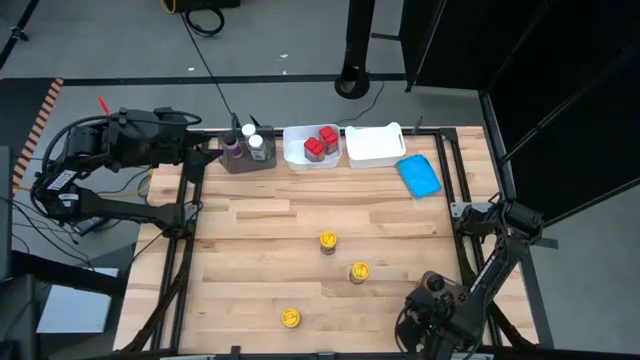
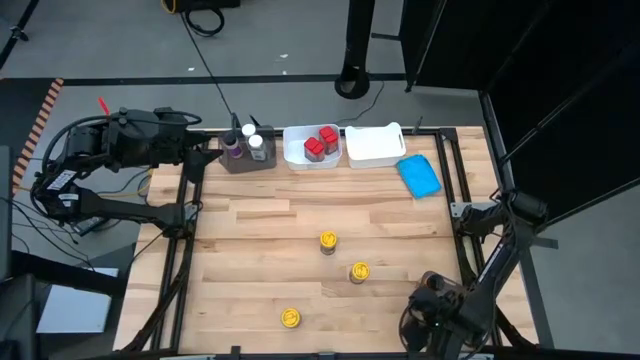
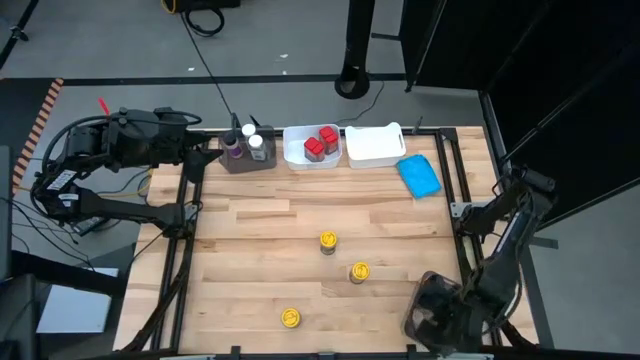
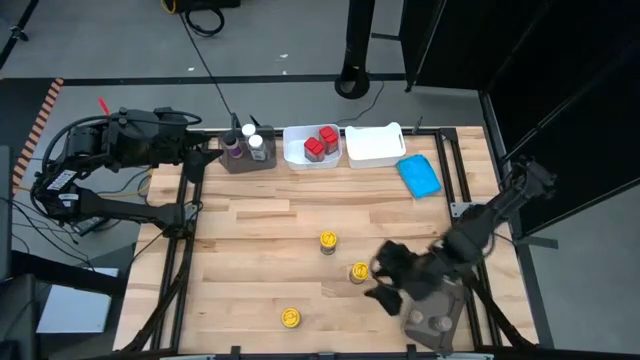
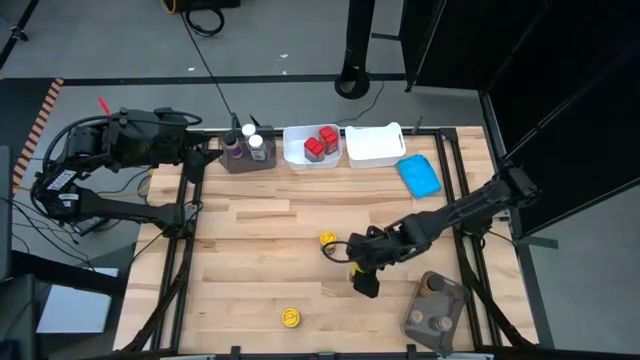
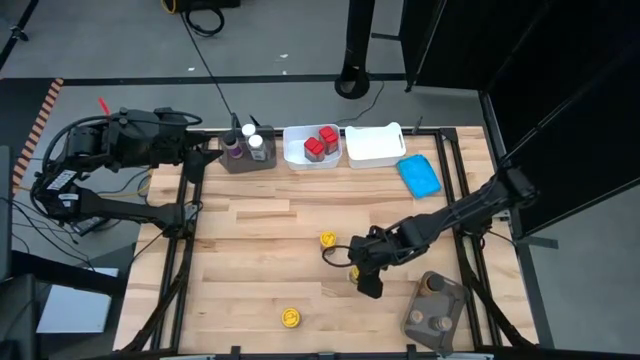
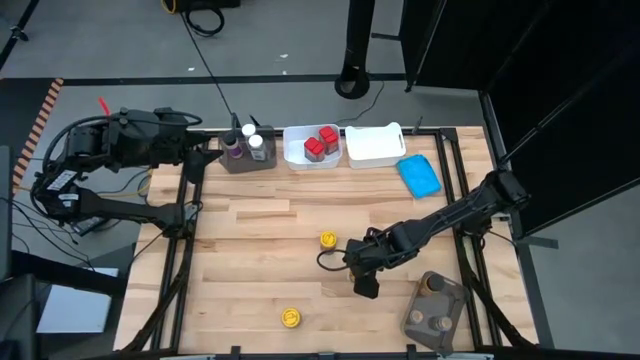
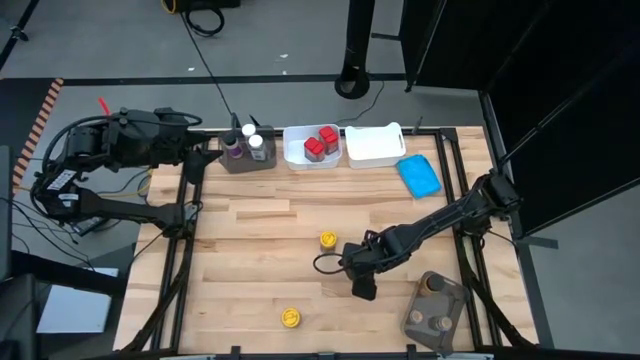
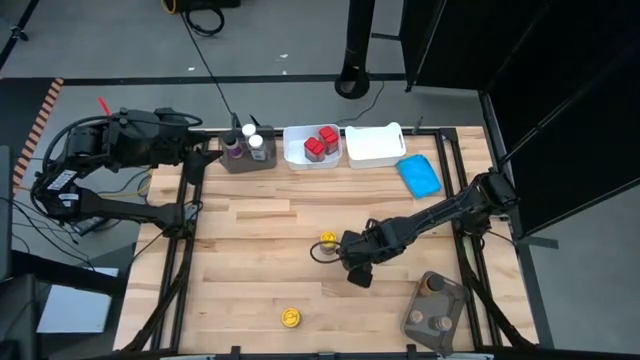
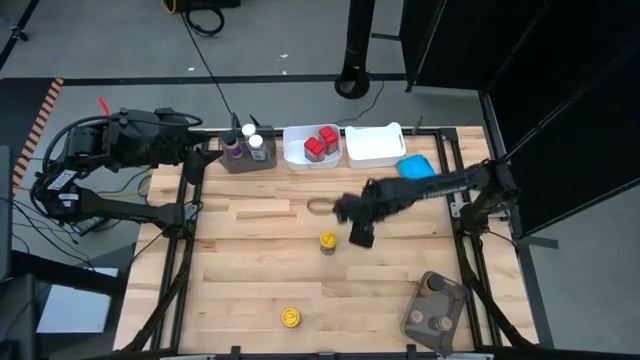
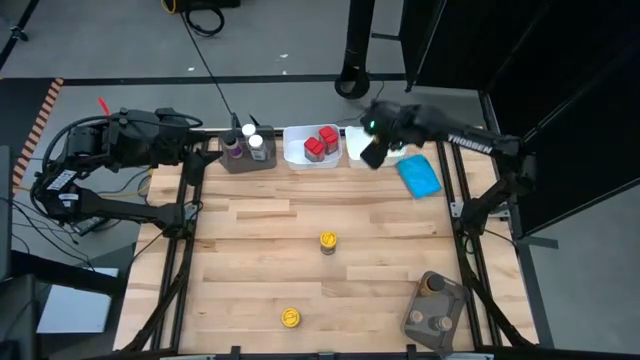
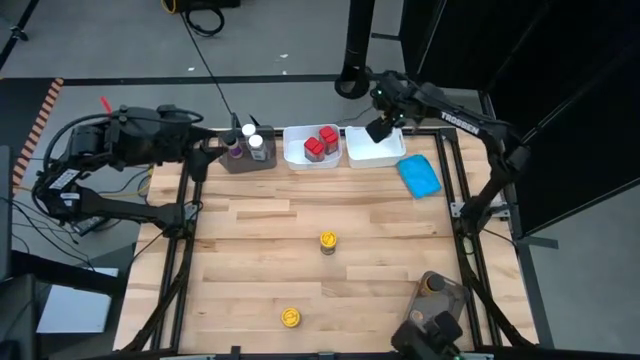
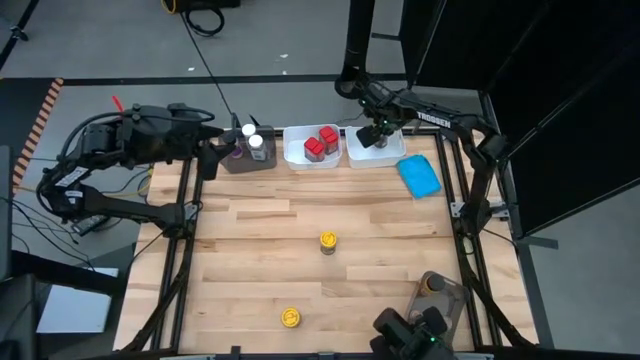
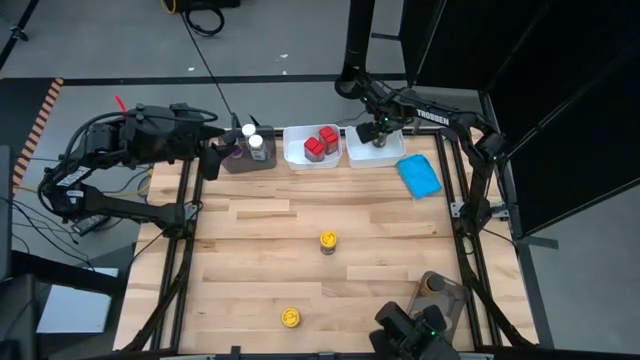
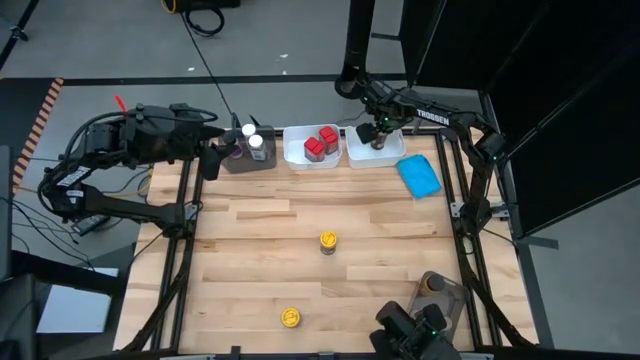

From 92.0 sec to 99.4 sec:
Task: Sort spices by type
Put the middle yellow seasoning bottle into the right white bin

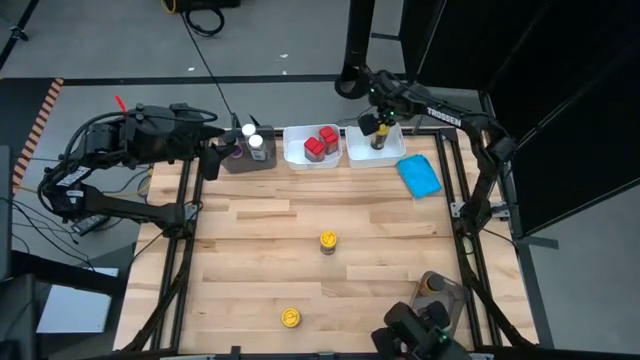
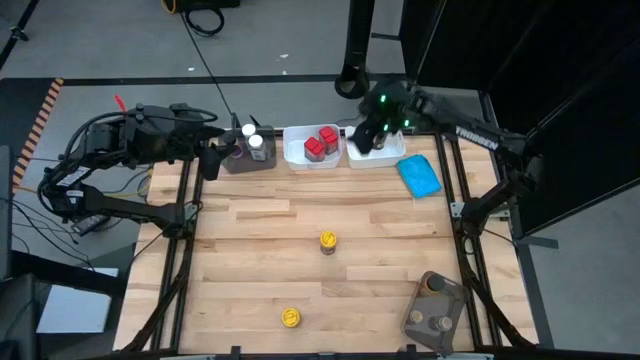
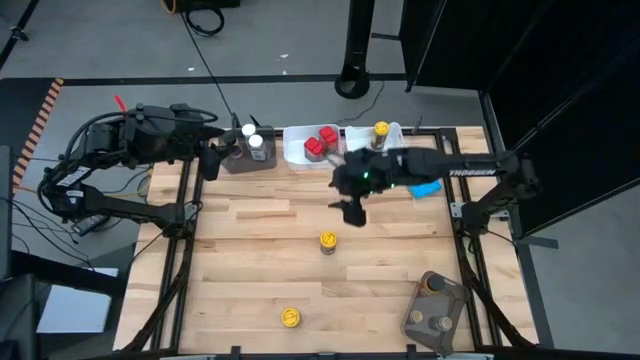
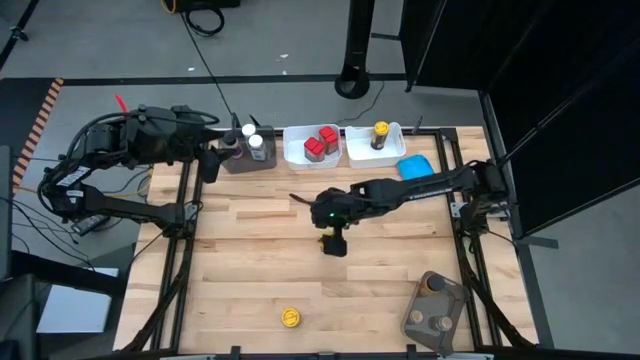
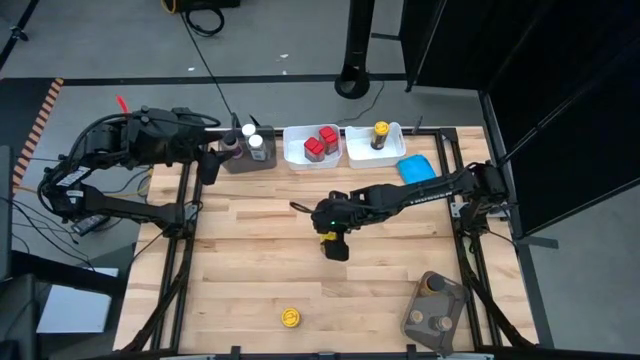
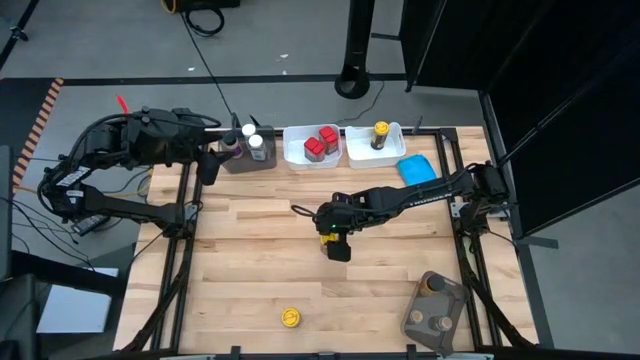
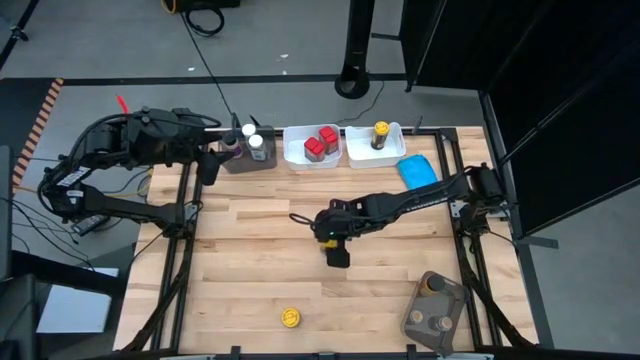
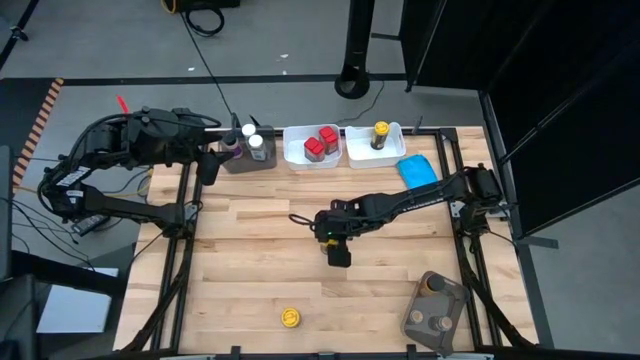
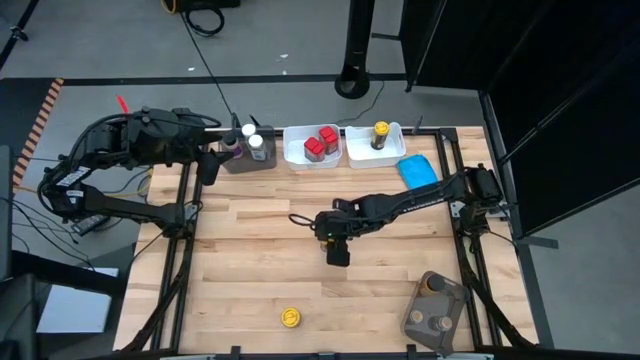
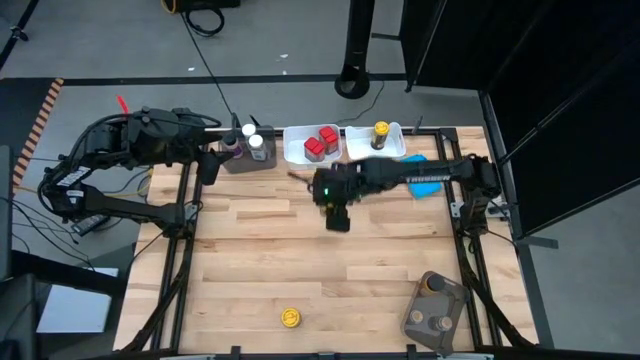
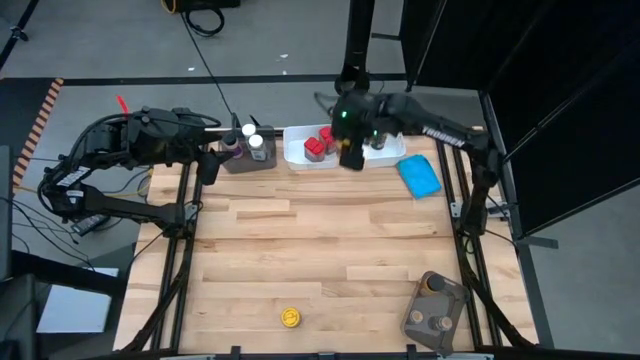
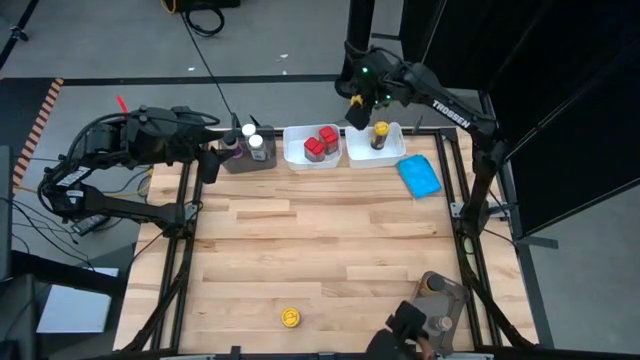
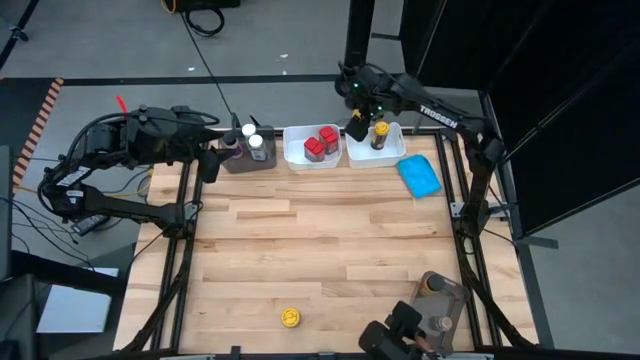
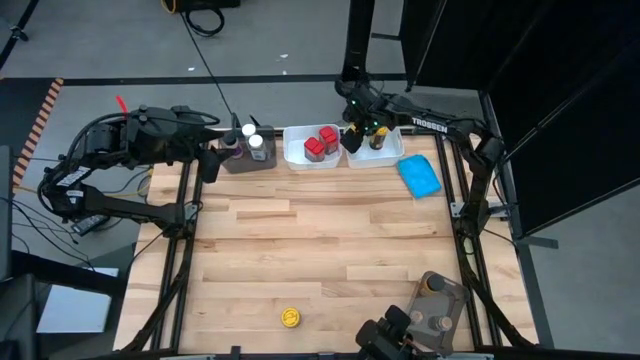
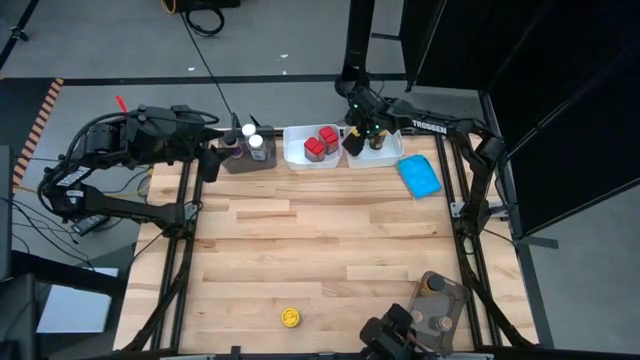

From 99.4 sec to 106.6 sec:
Put the top yellow seasoning bottle into the right white bin

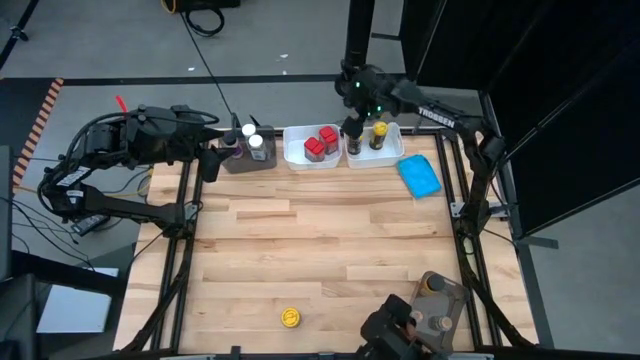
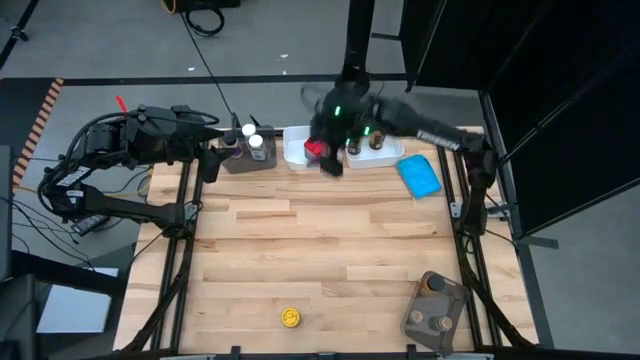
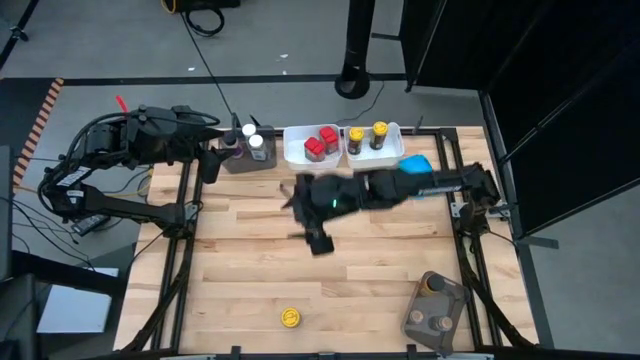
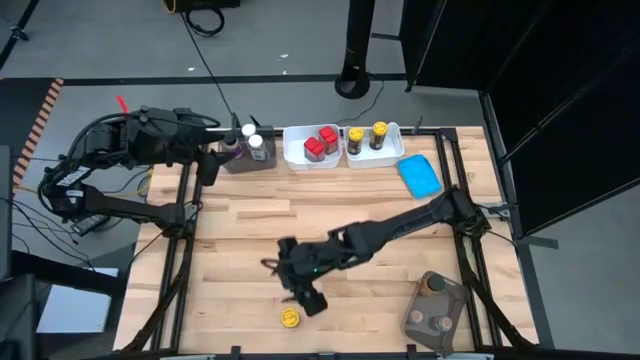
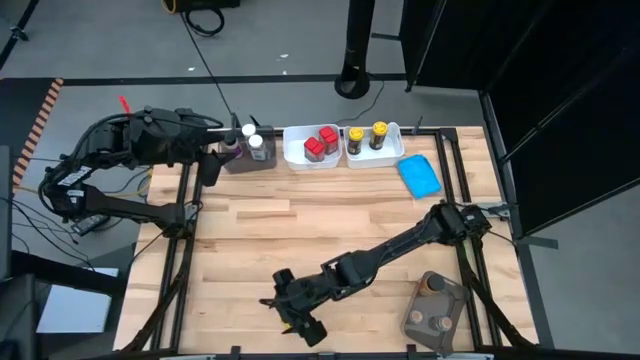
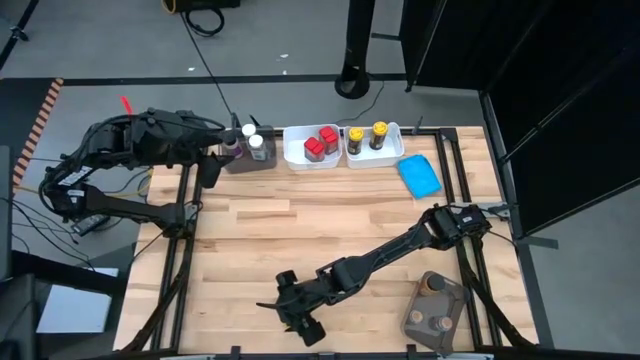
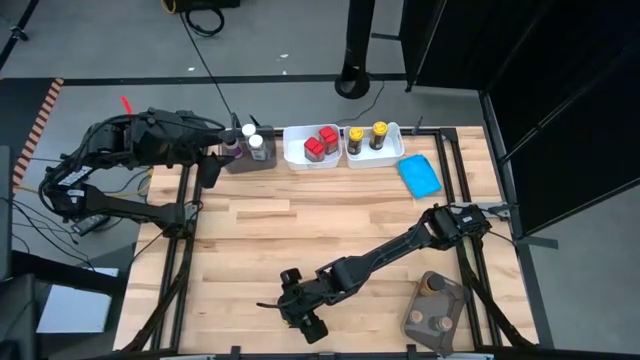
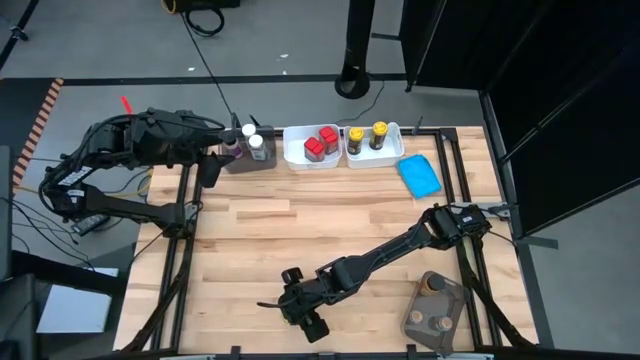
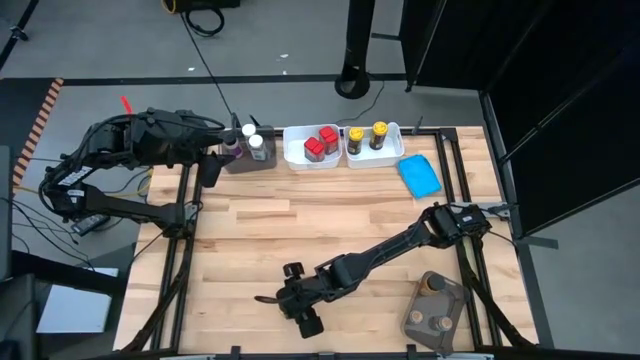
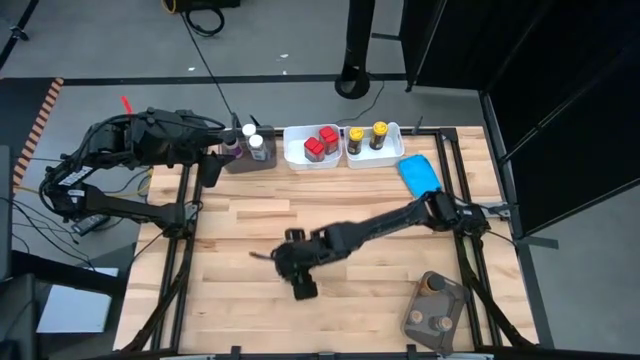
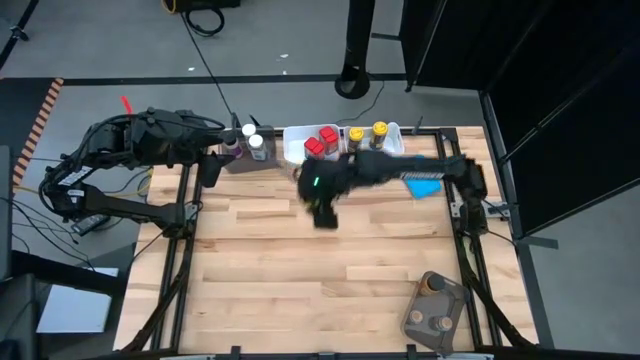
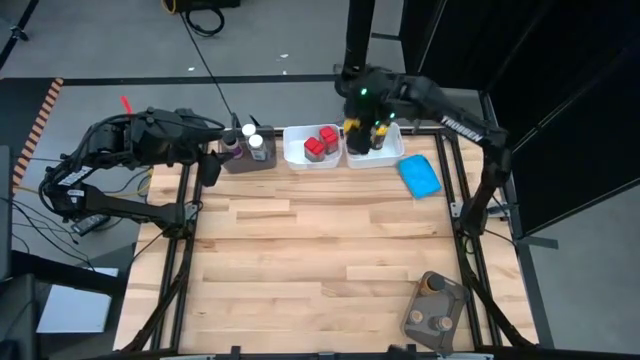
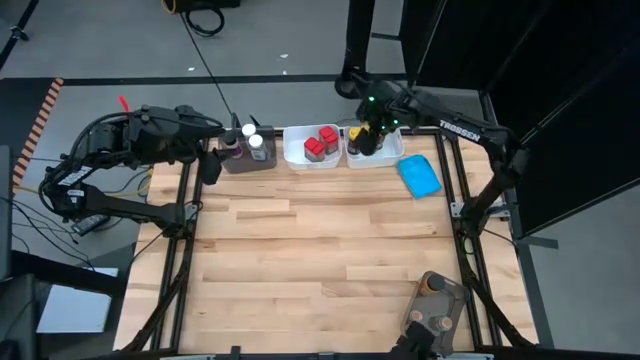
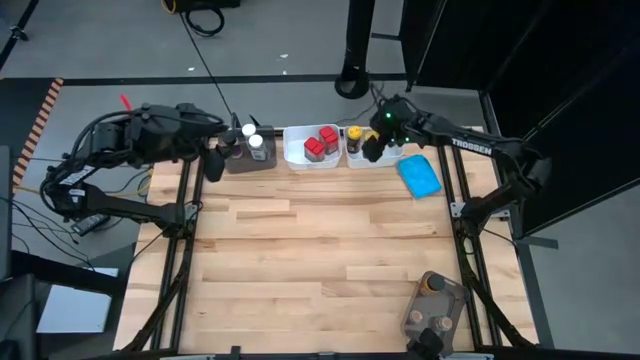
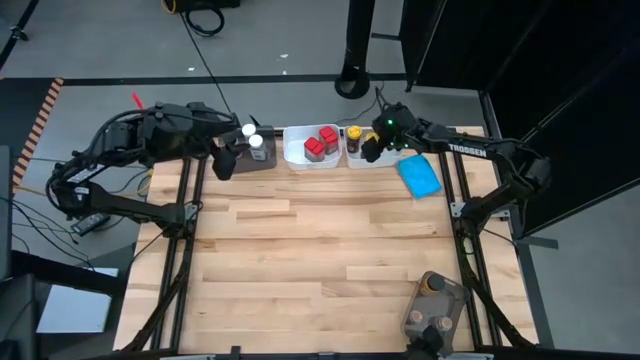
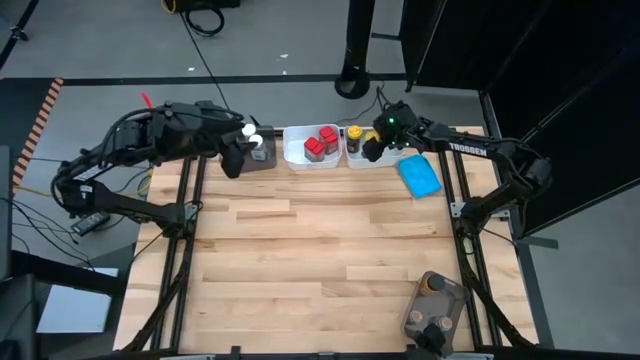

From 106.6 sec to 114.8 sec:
Put the yellow seasoning bottle into the right white bin
